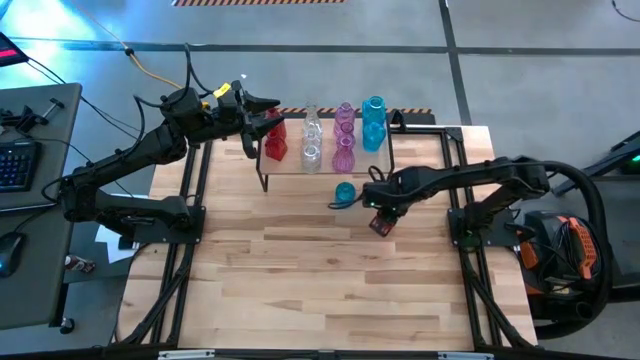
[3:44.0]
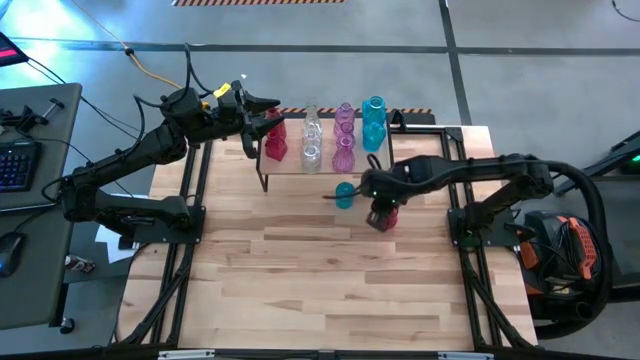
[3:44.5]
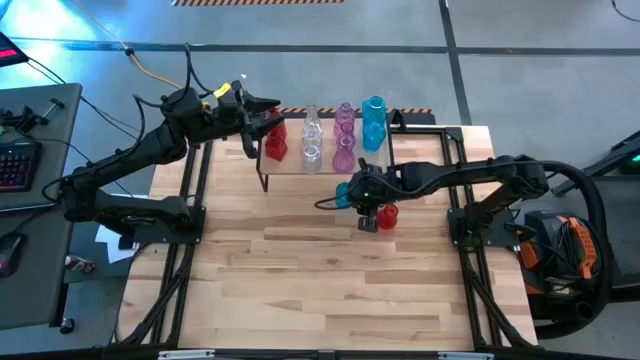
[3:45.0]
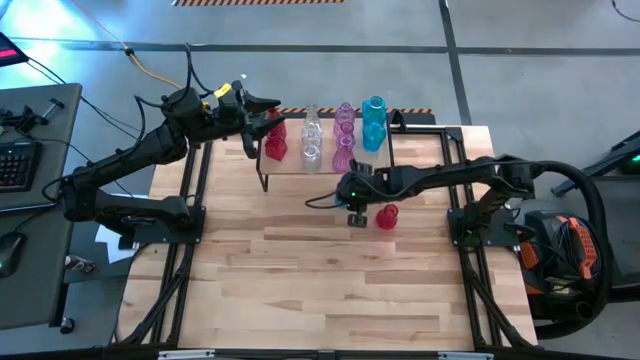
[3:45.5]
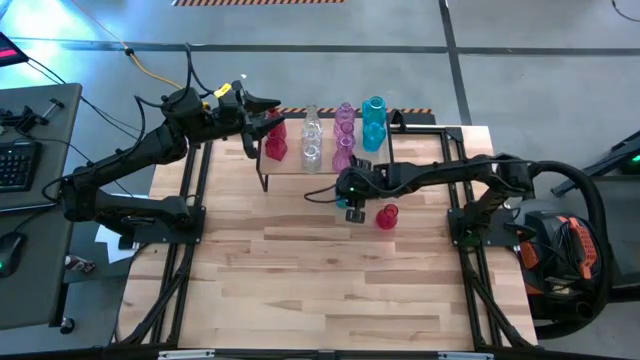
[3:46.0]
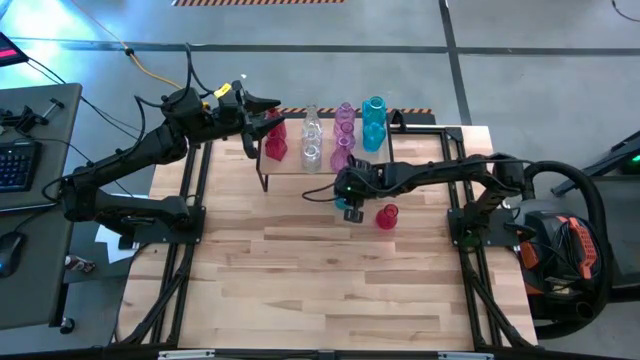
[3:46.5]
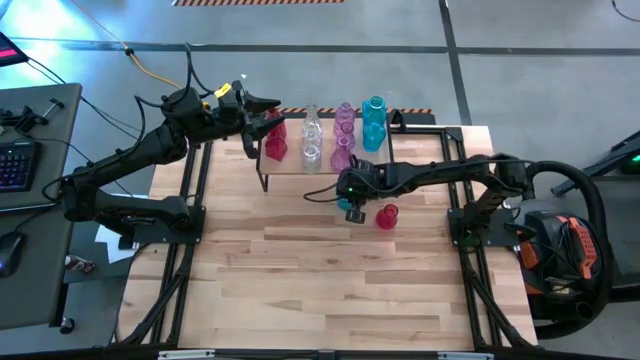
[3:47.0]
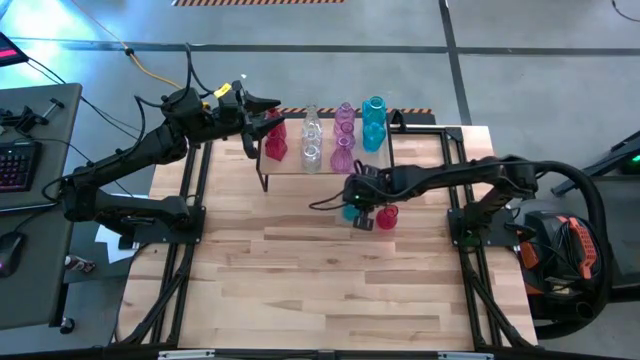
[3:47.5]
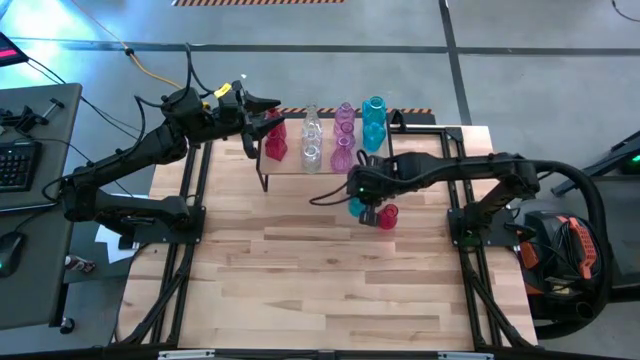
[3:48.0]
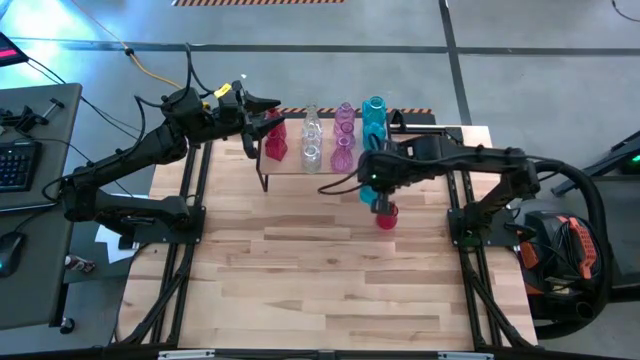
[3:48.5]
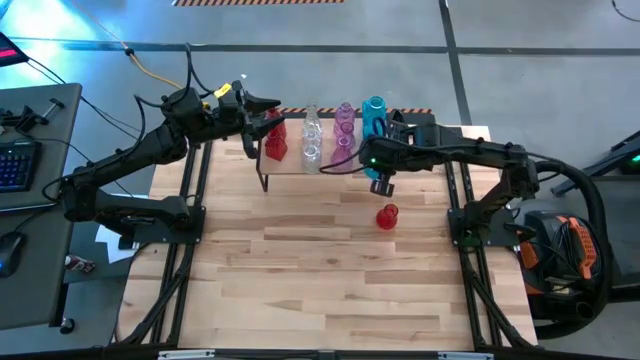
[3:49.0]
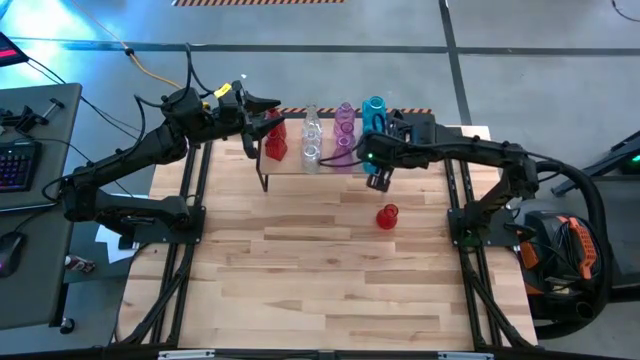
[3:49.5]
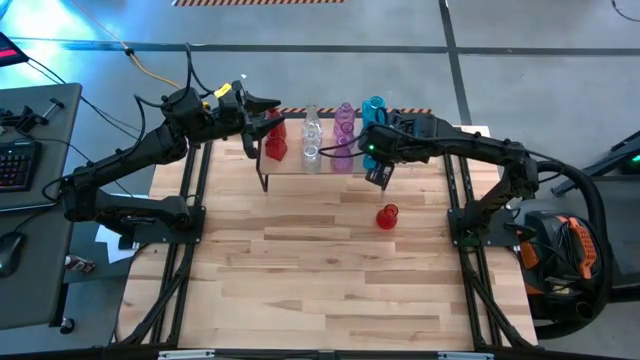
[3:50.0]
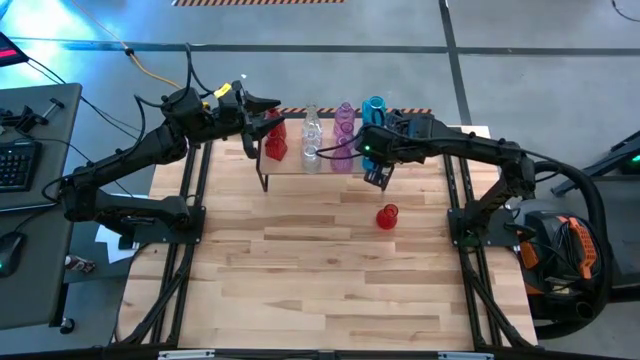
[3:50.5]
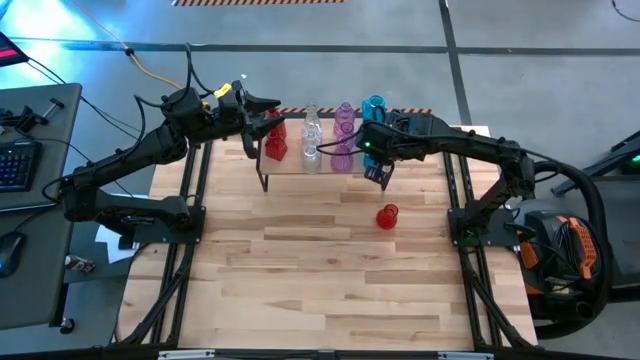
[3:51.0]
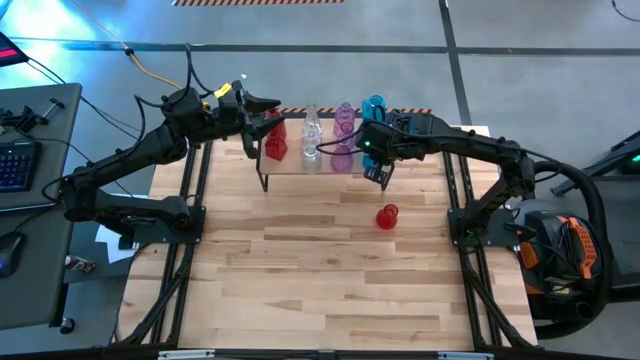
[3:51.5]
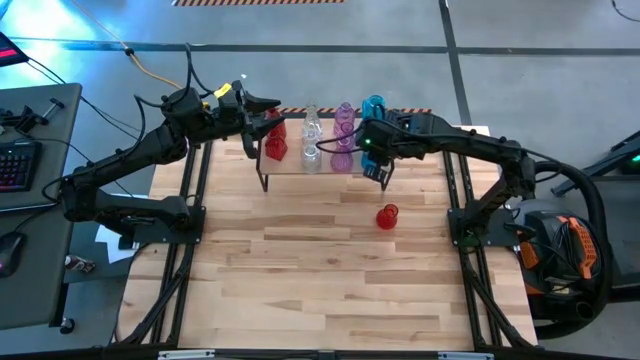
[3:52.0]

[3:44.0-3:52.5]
Task: sort vases onto shelf
Put the blue vase on the shelf aligned with the other blue vases

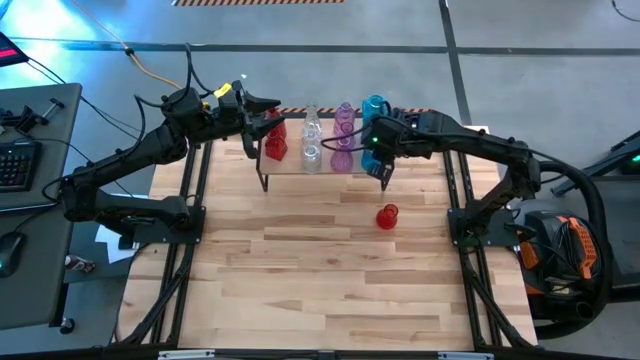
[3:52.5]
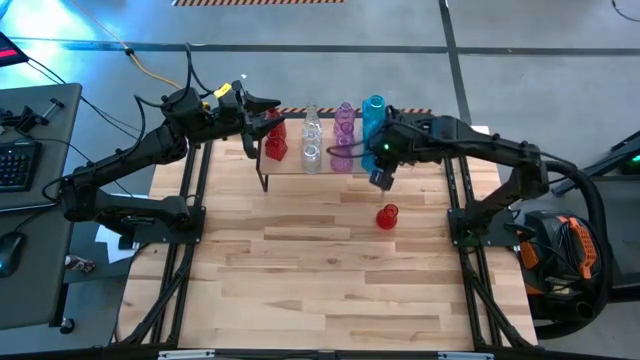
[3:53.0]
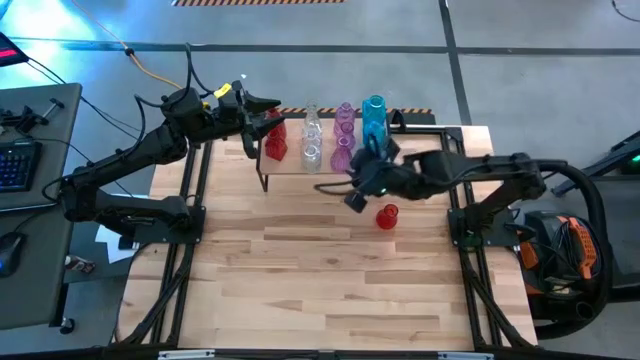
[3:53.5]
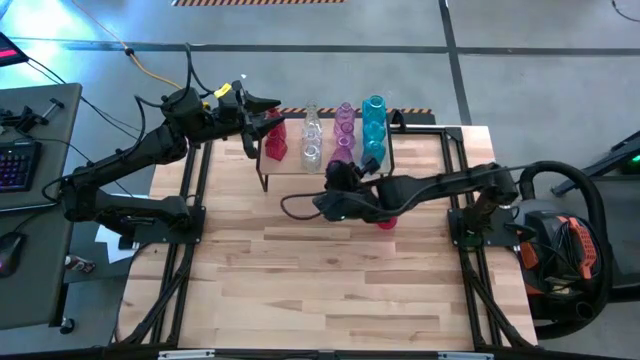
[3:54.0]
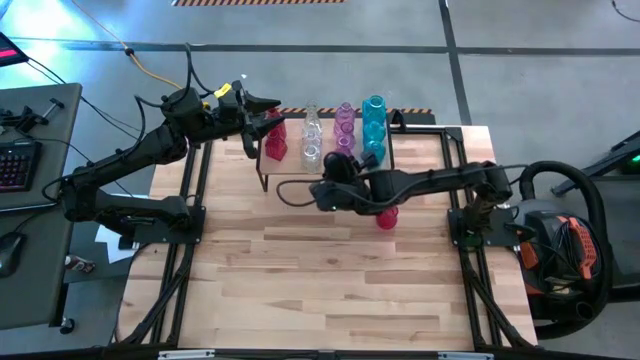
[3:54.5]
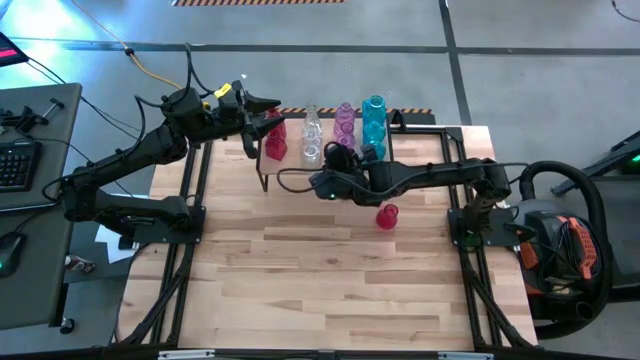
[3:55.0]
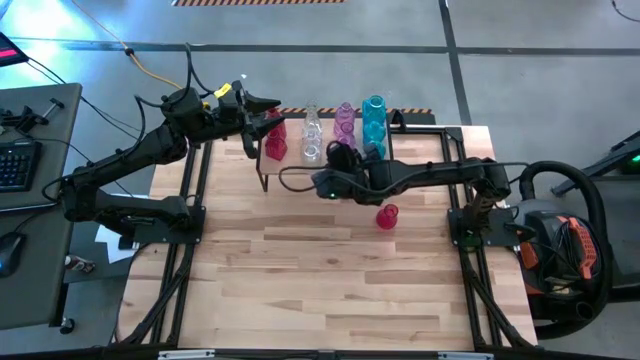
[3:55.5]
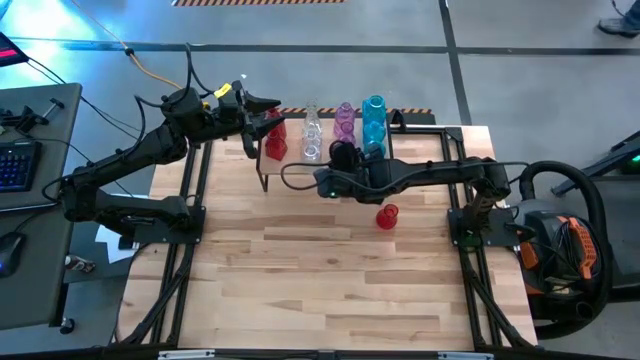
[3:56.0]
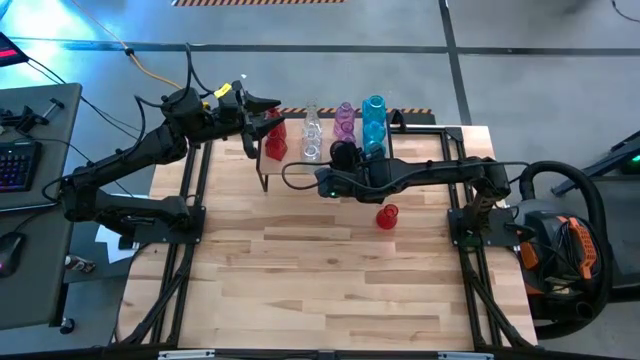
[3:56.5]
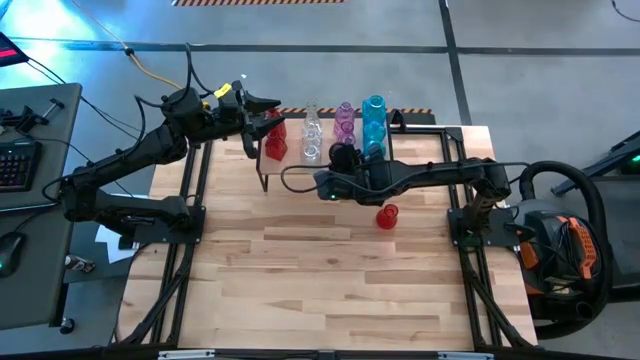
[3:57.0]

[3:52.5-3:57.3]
Adjust the violet vase on the shelf

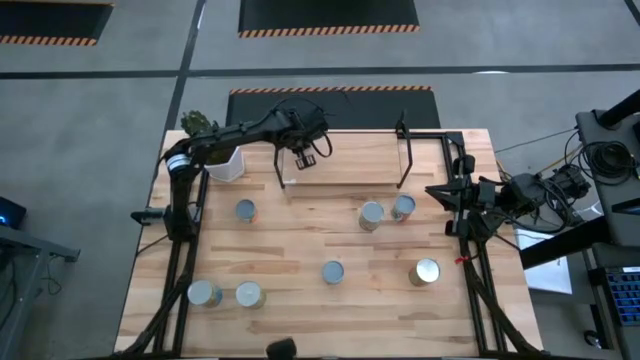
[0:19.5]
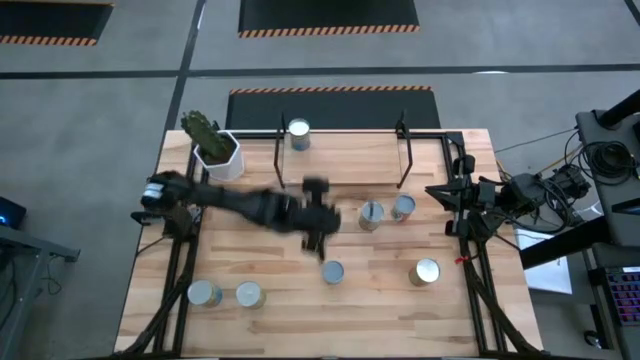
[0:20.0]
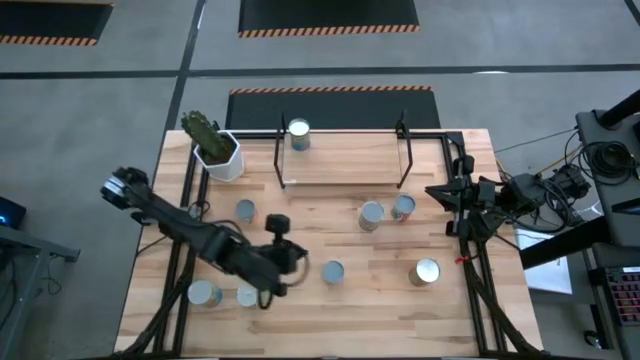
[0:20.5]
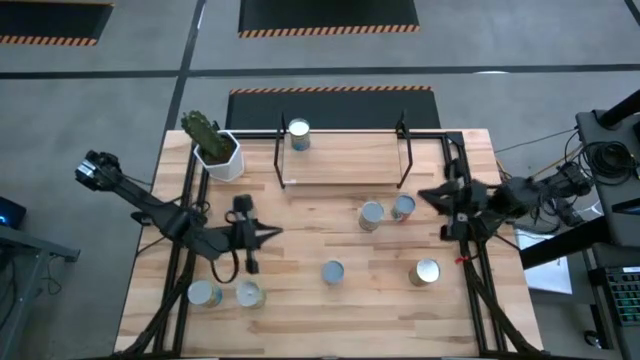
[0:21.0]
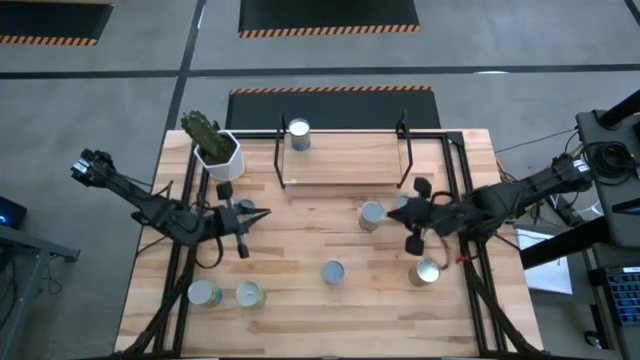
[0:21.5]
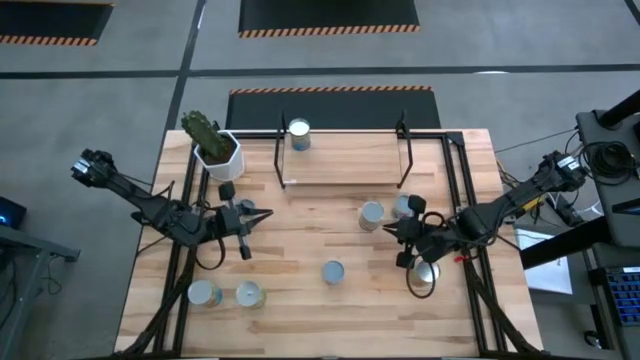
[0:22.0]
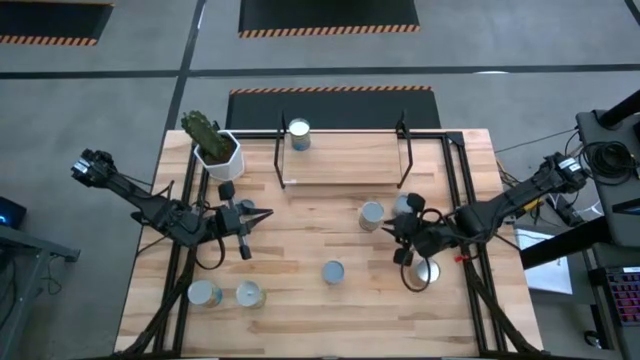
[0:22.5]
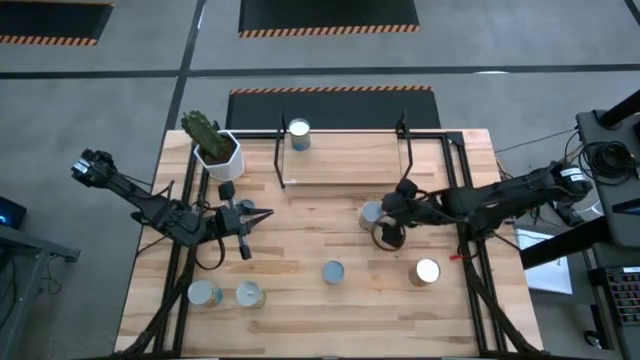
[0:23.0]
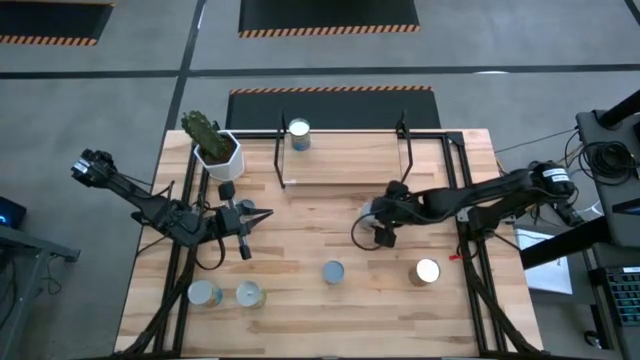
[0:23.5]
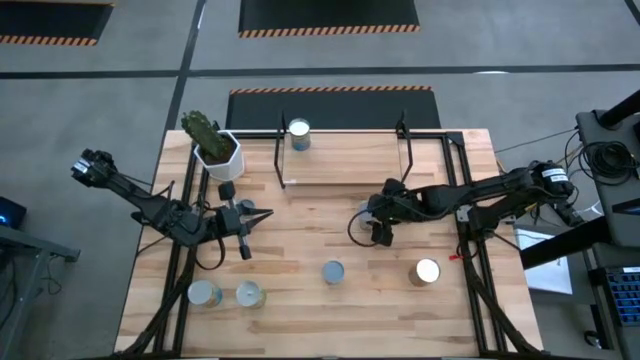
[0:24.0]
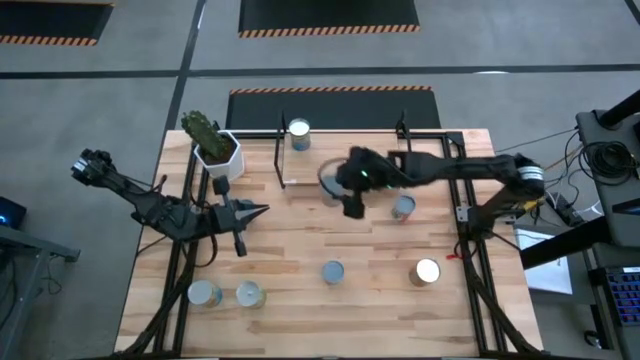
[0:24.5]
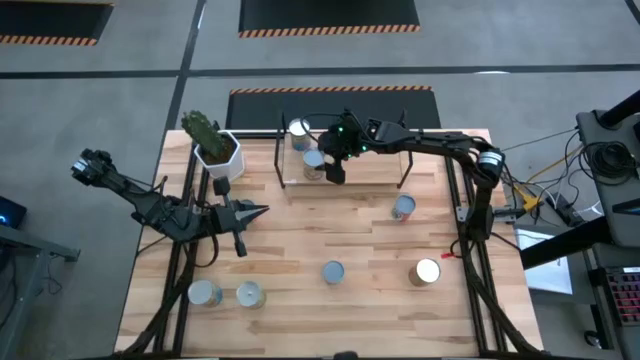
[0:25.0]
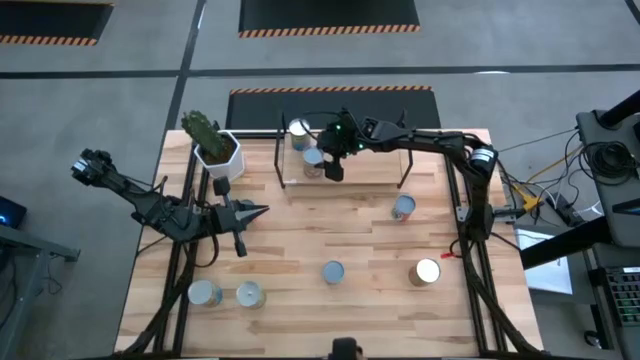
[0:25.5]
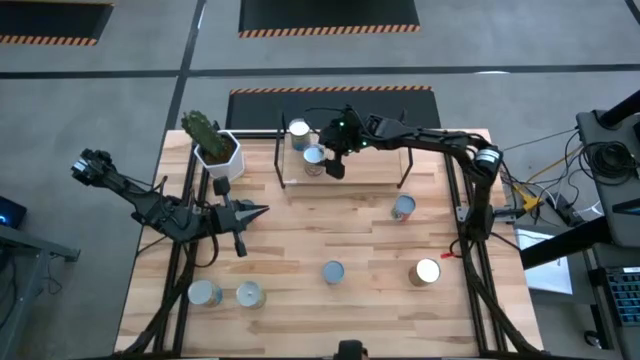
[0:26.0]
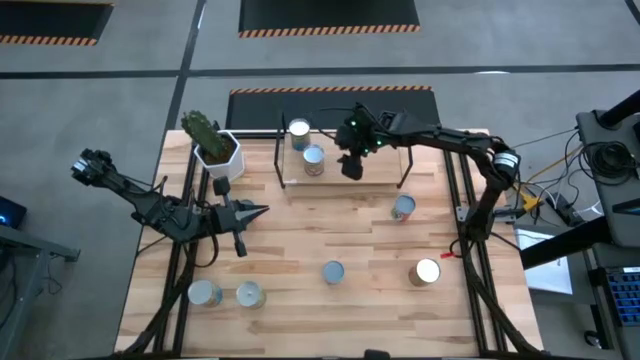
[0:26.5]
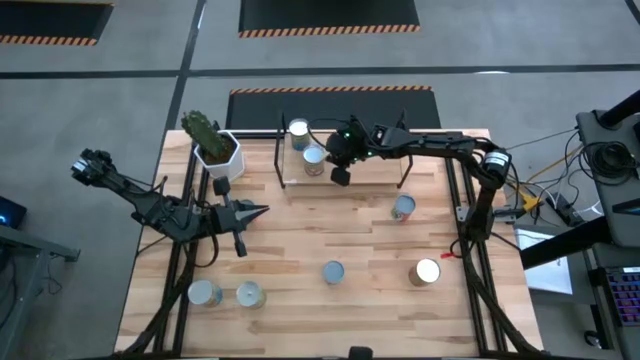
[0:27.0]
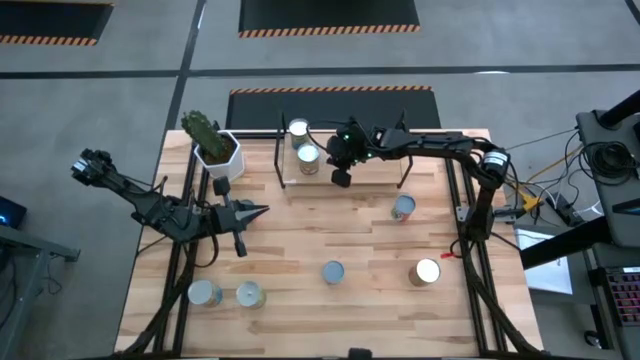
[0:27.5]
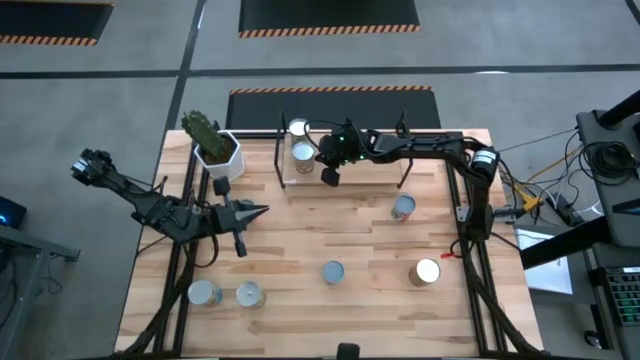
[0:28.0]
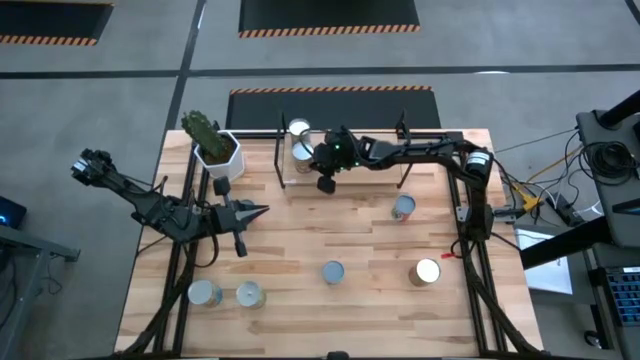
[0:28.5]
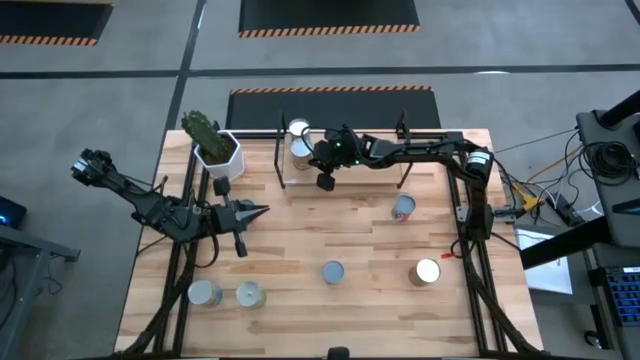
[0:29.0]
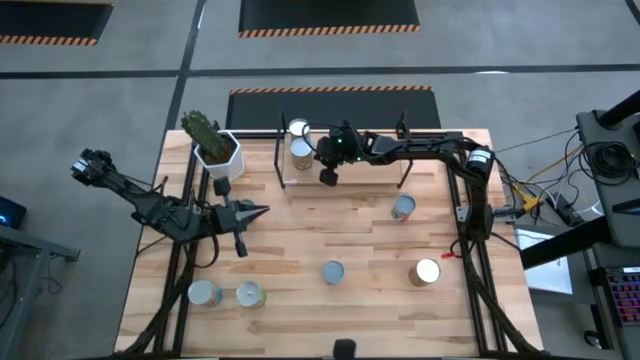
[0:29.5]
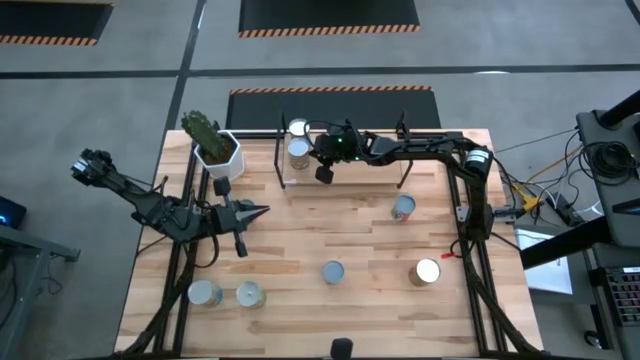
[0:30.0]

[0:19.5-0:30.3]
Task: Pick and place cans onto a shelf
Put the canned peaches on the shelf
